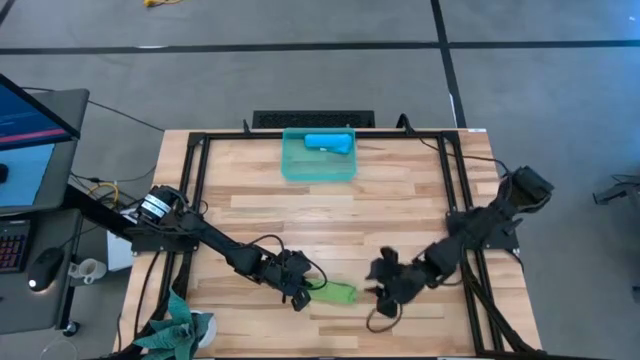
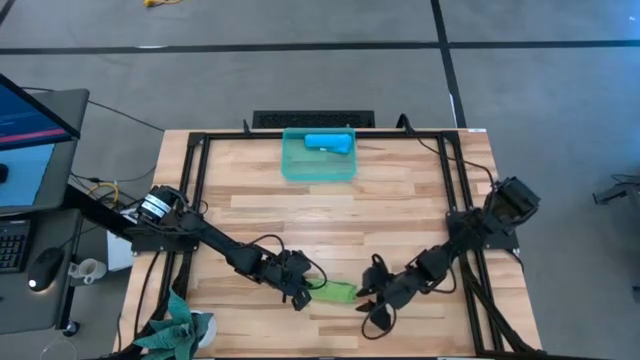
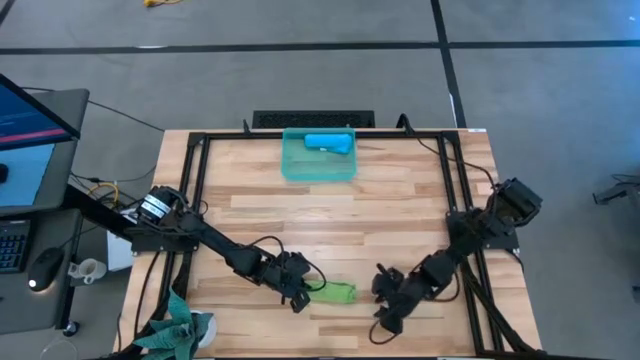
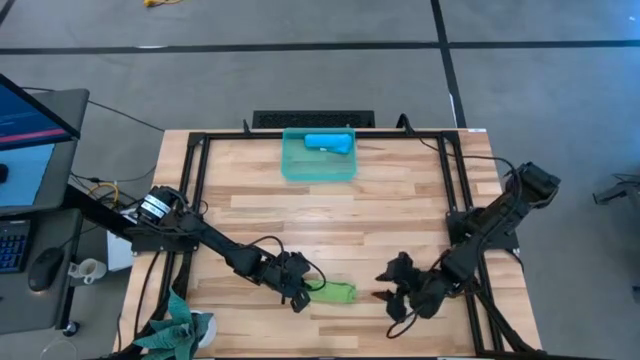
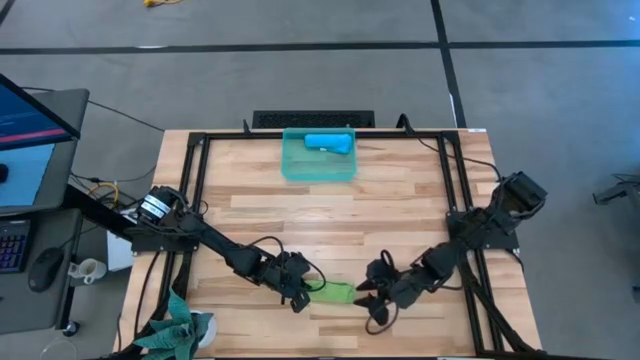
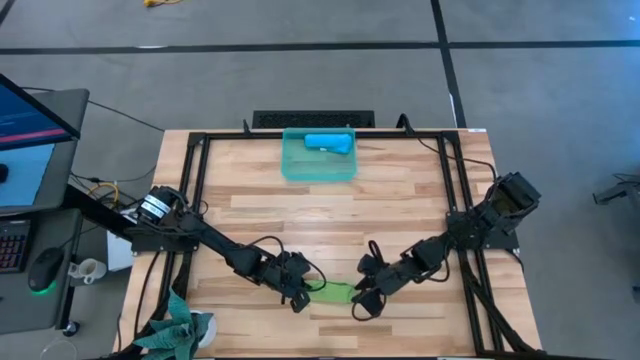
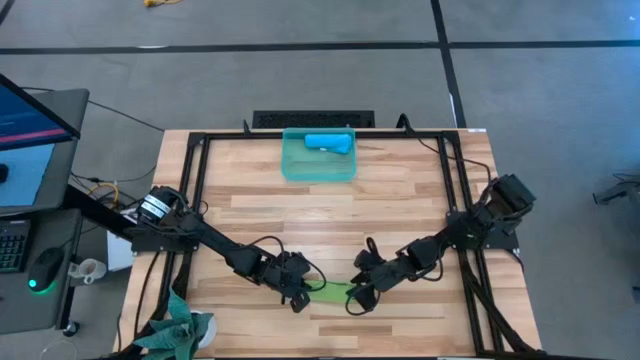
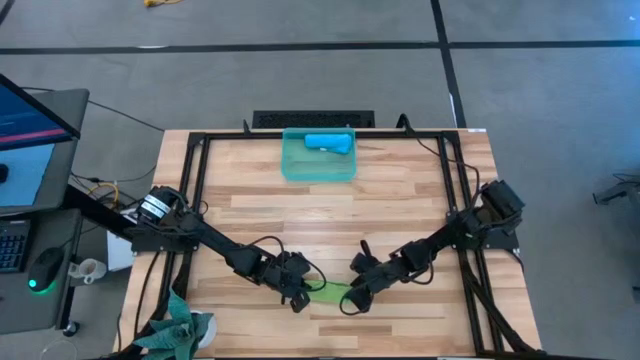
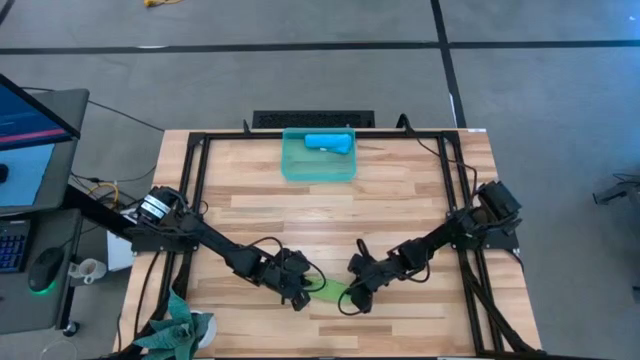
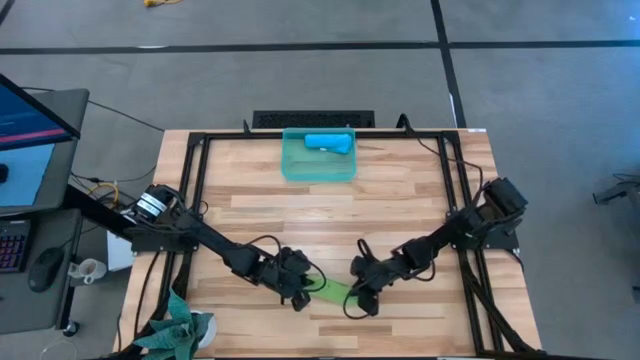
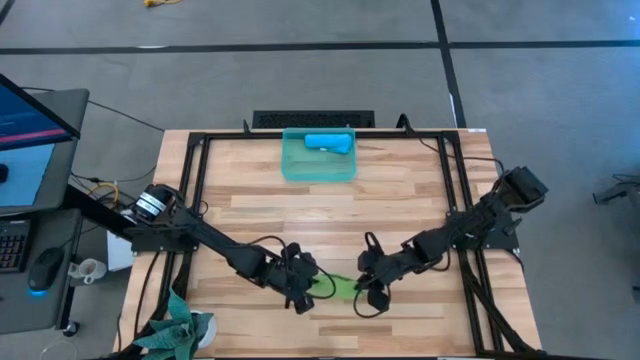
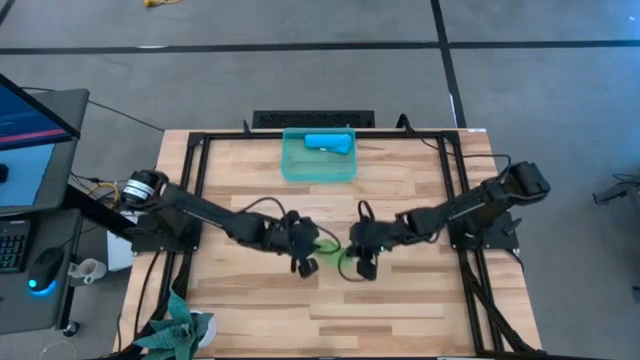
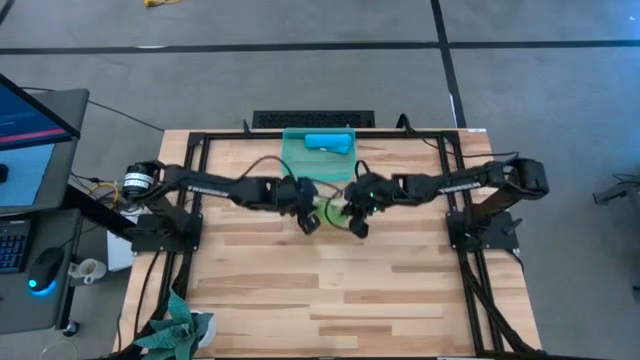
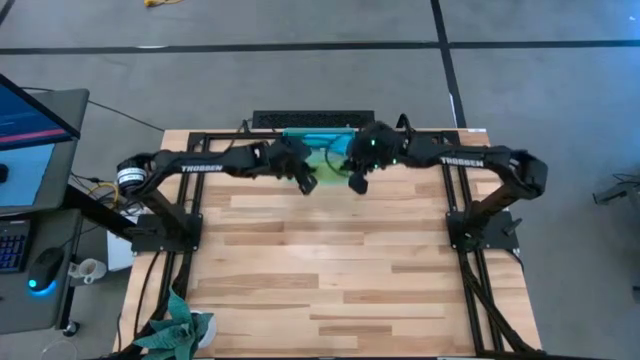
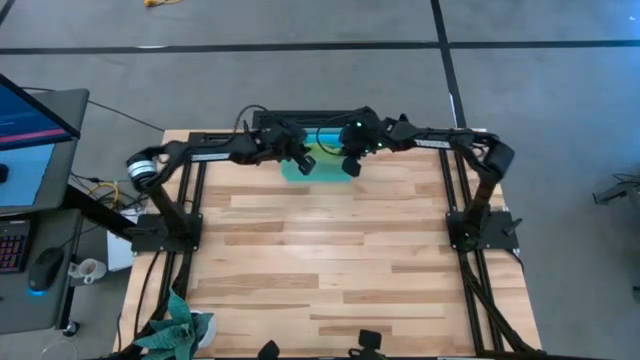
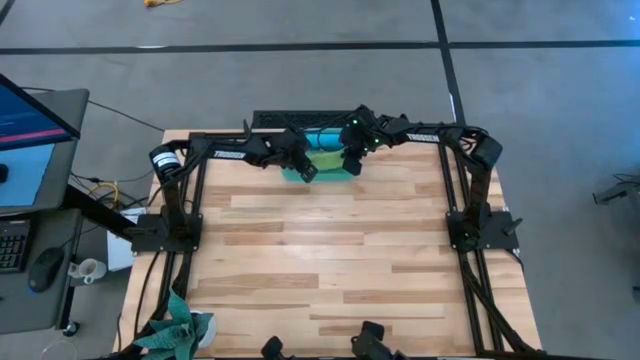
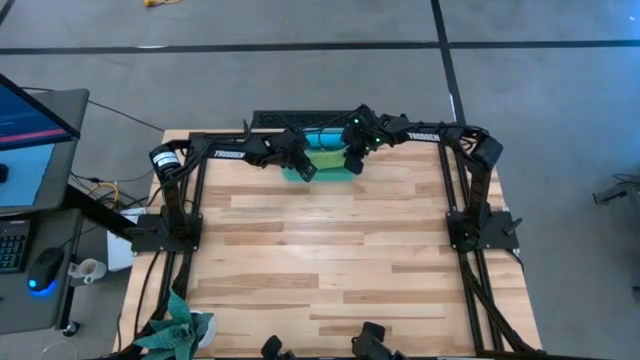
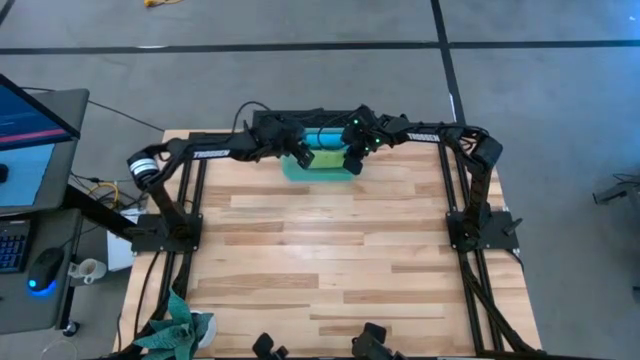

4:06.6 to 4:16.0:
Task: Roll microfiber towels into tight, uniform cylinder then place into a basket
Put the green microfiber cloth into the blue bin

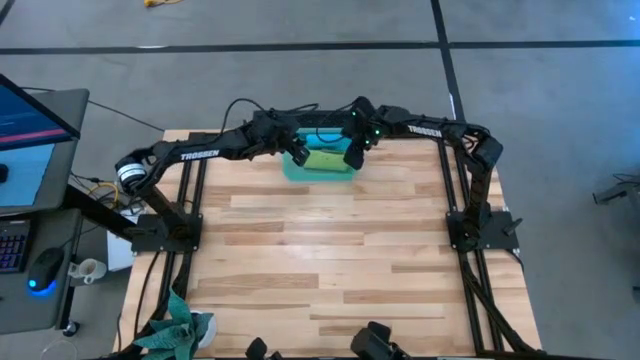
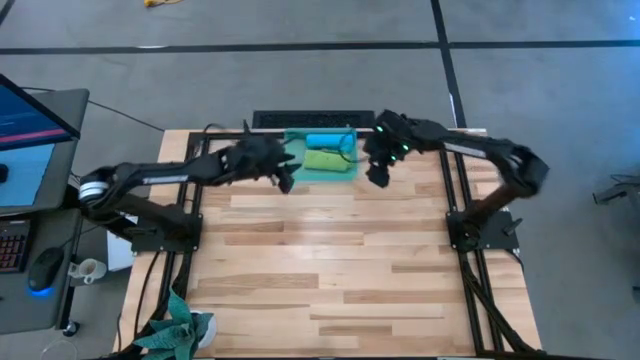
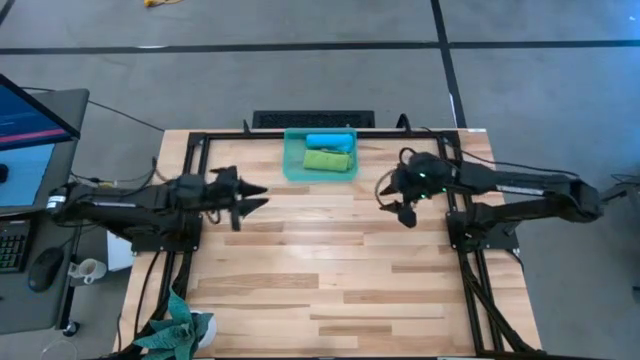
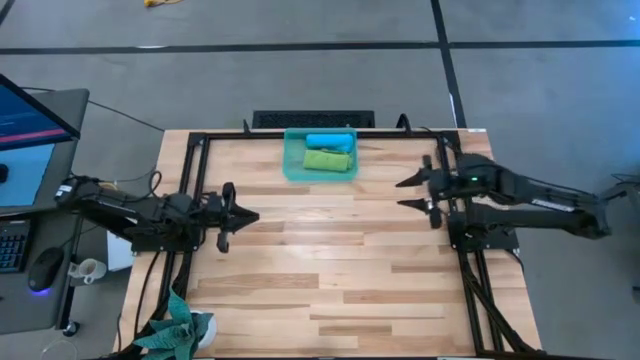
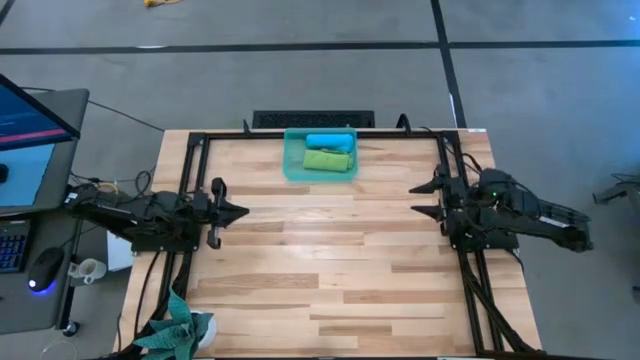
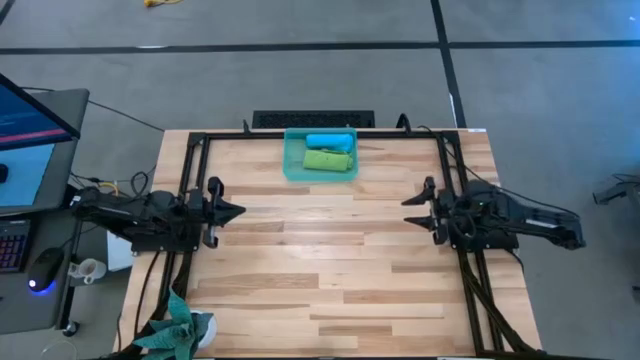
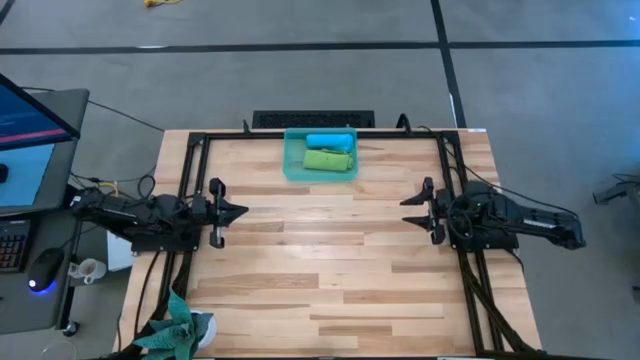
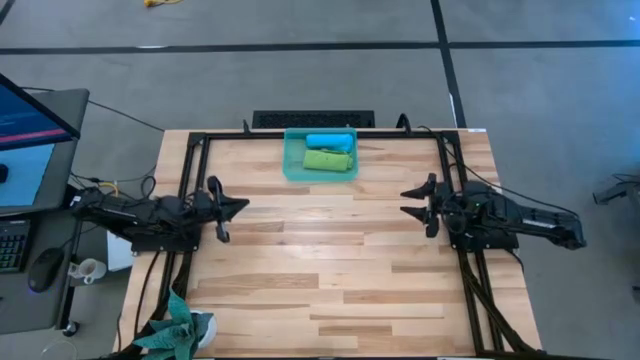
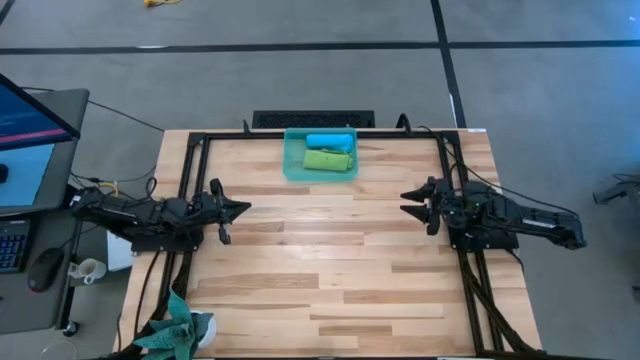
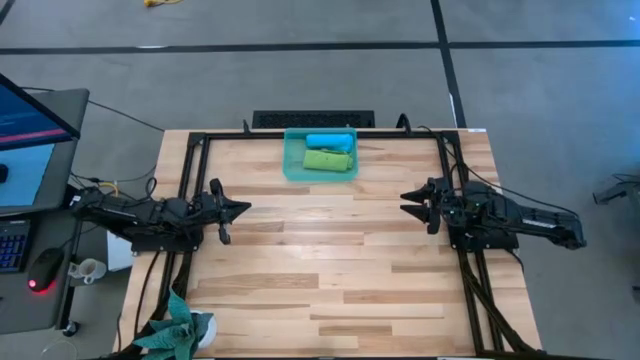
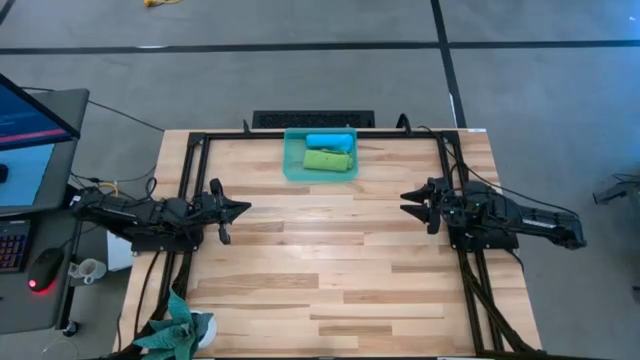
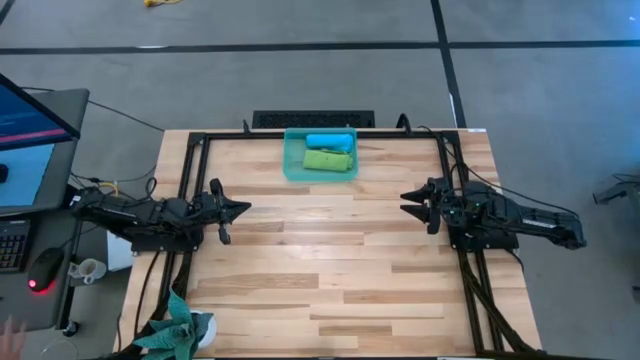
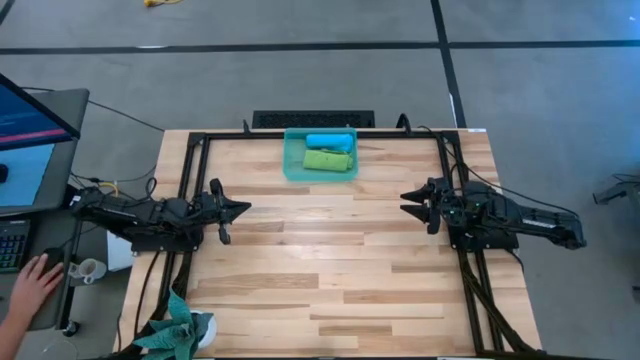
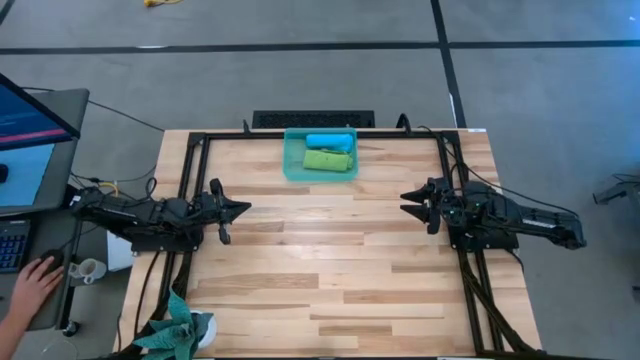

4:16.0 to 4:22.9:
Return to Home Position

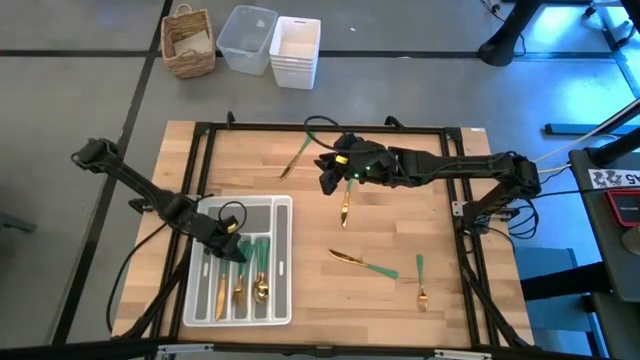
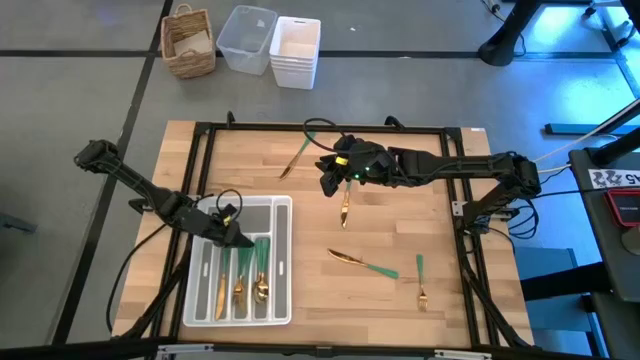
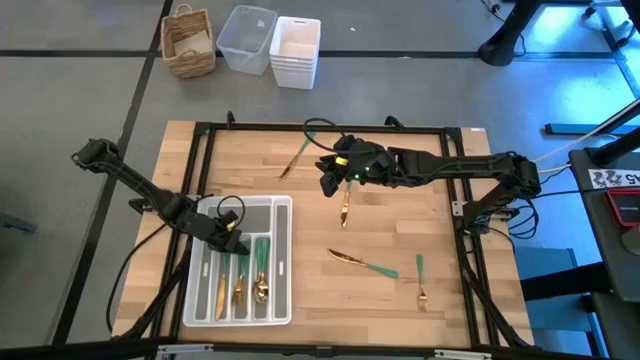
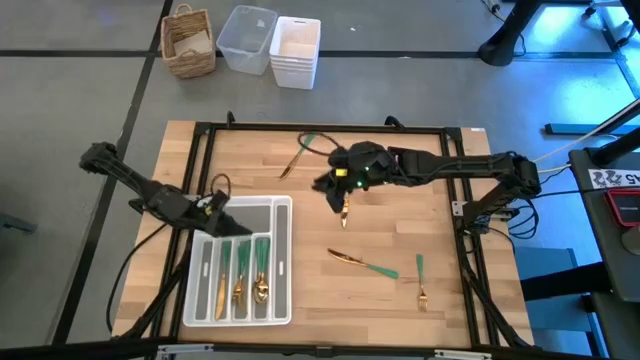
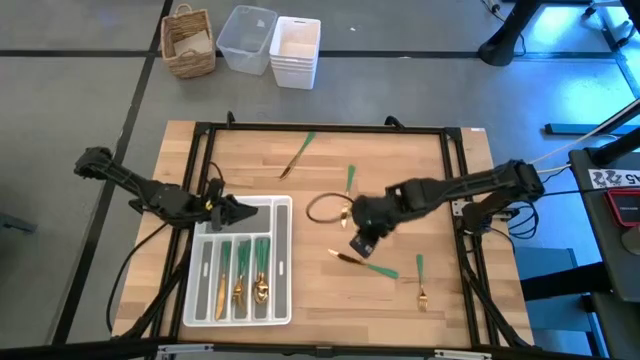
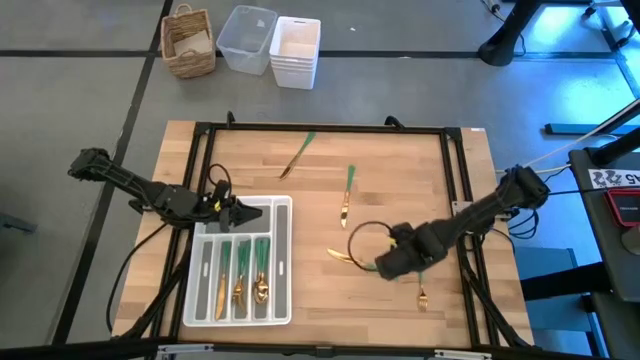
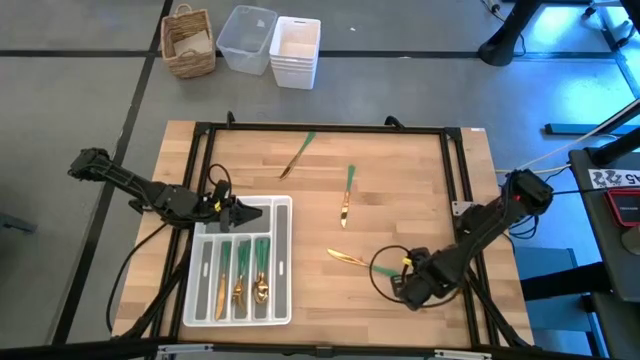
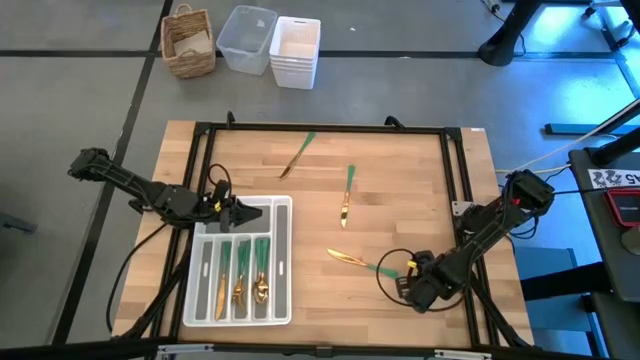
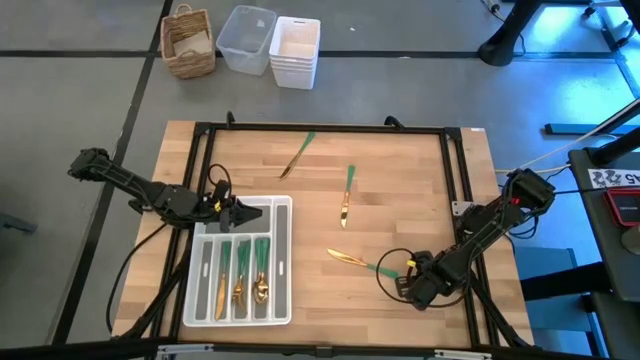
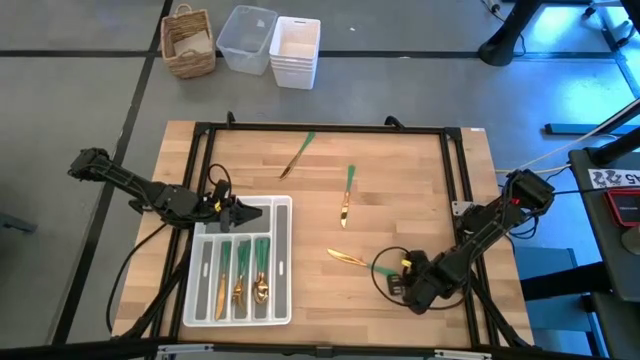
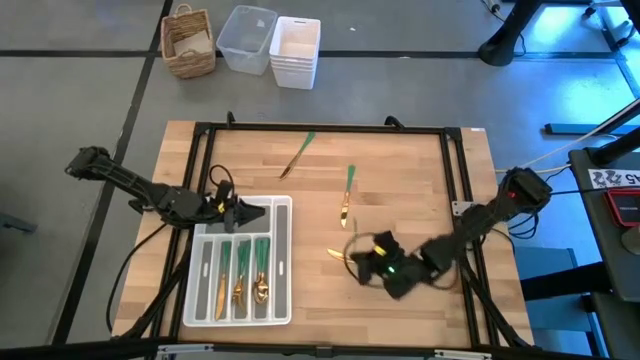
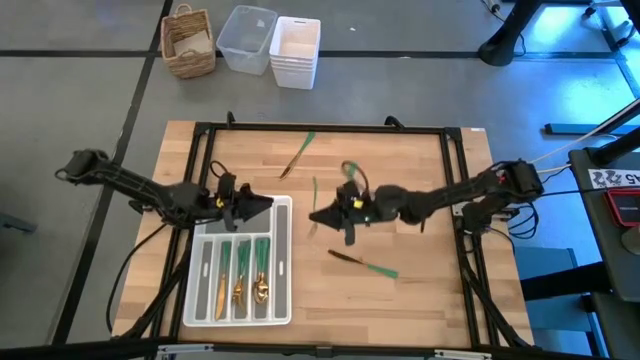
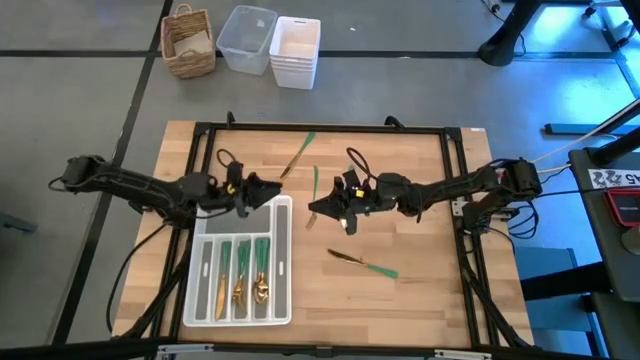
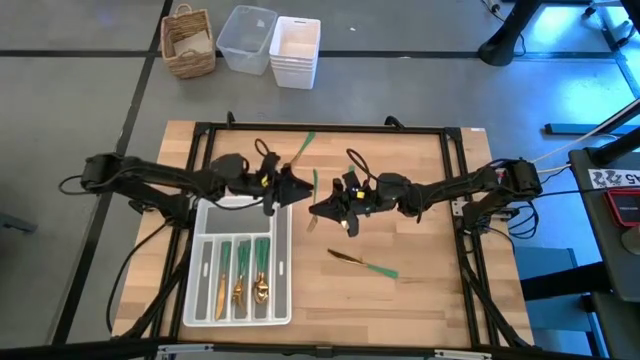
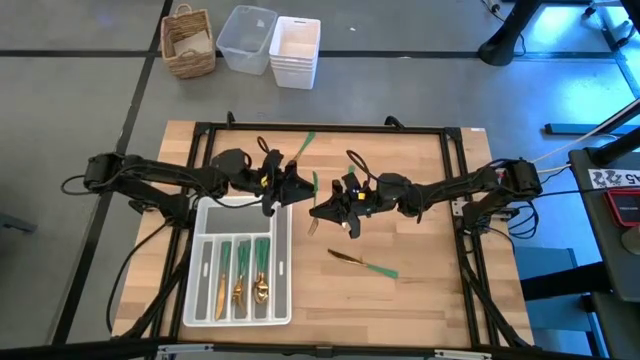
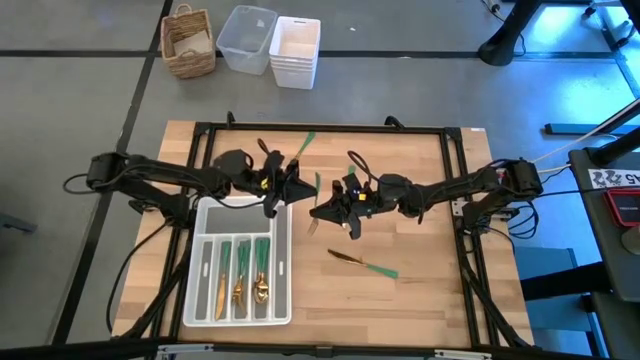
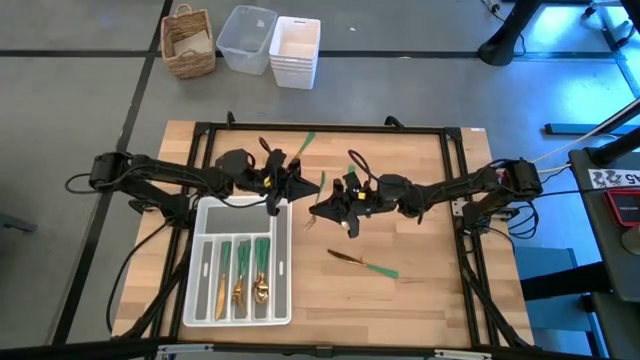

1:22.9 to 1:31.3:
Task: Sort silverware
Put the green fork on the silverware tray
